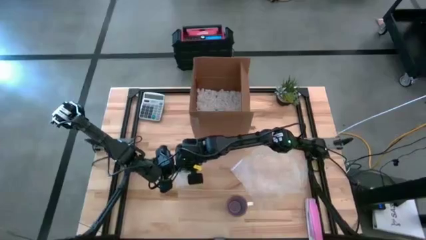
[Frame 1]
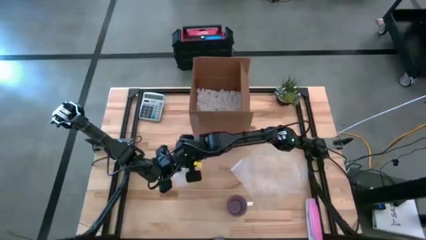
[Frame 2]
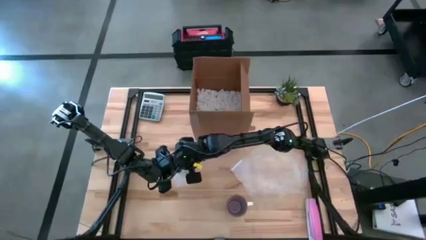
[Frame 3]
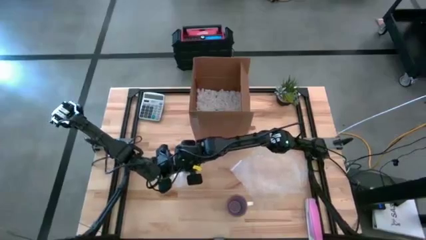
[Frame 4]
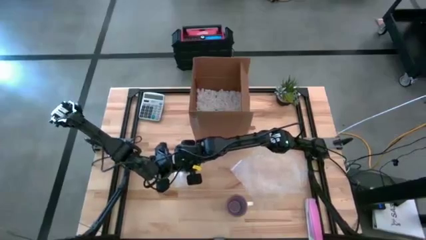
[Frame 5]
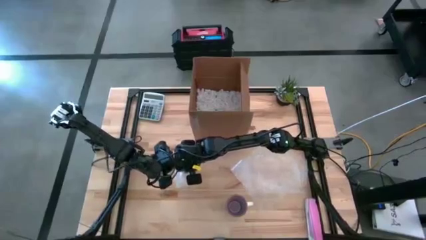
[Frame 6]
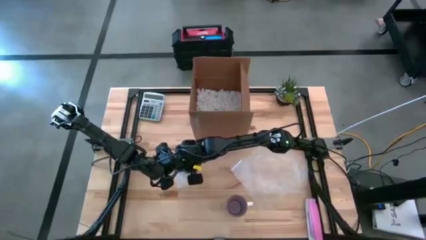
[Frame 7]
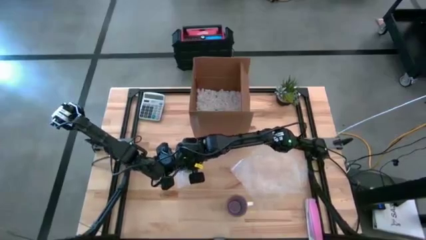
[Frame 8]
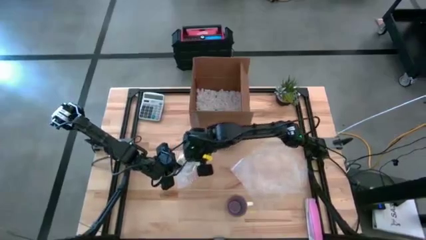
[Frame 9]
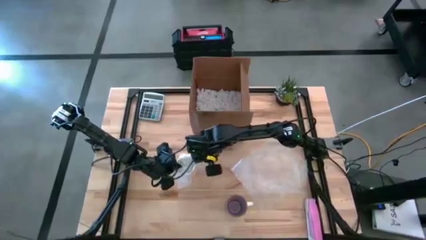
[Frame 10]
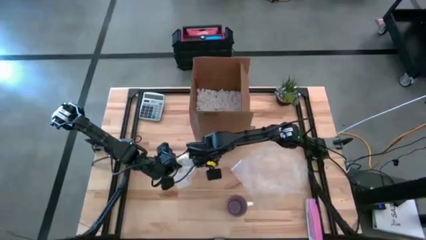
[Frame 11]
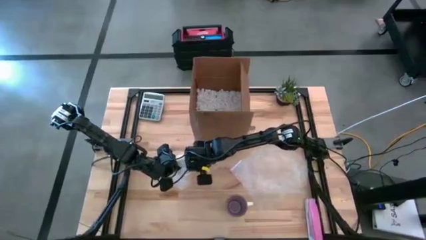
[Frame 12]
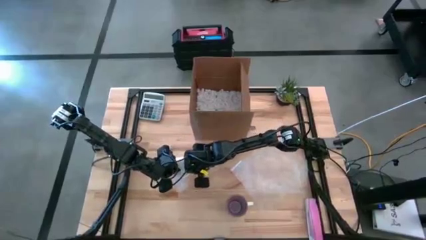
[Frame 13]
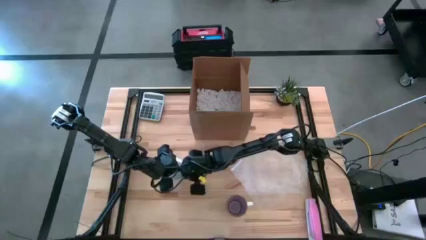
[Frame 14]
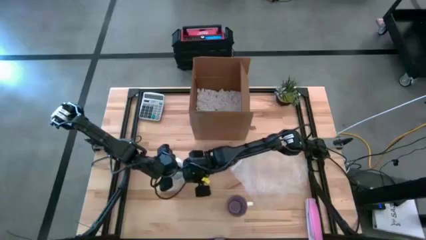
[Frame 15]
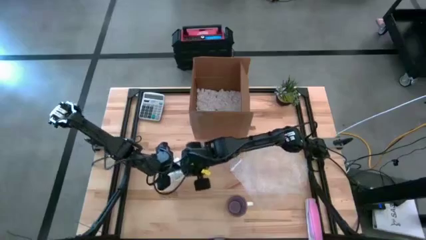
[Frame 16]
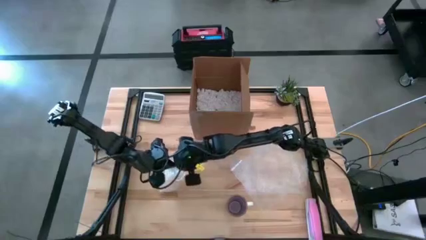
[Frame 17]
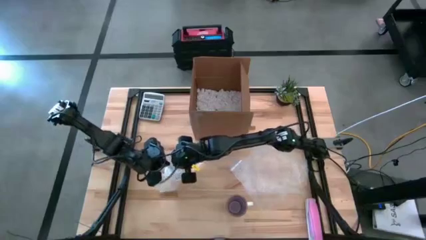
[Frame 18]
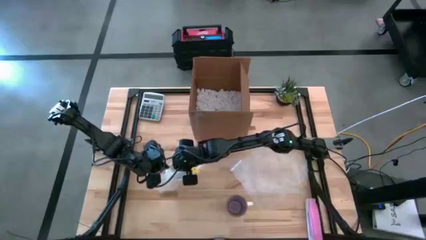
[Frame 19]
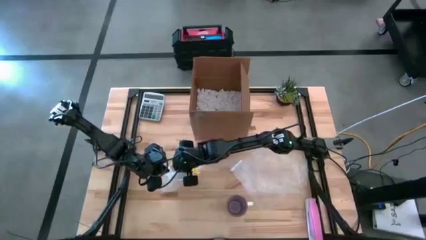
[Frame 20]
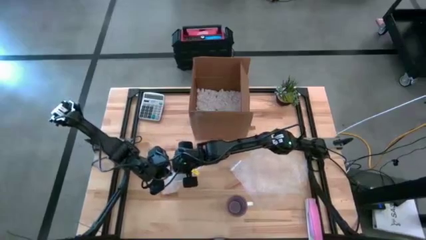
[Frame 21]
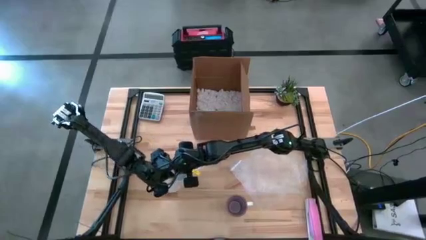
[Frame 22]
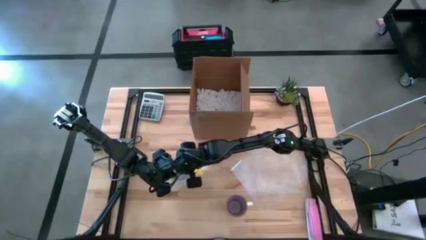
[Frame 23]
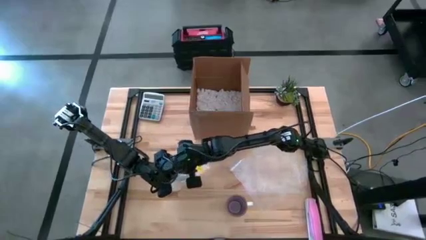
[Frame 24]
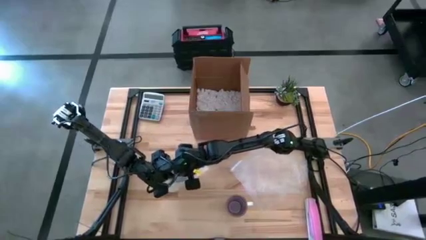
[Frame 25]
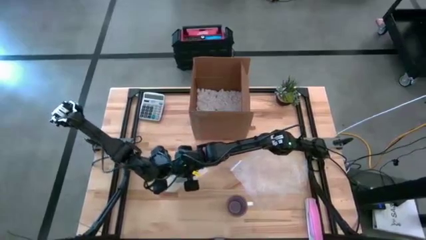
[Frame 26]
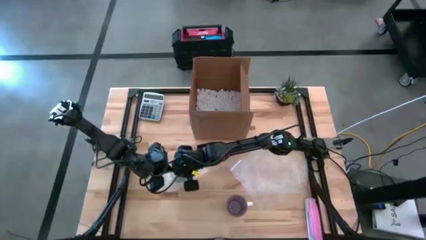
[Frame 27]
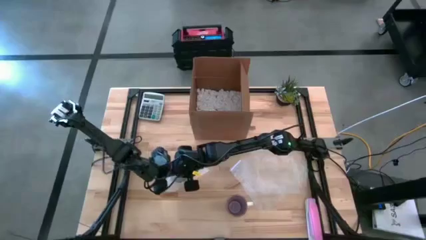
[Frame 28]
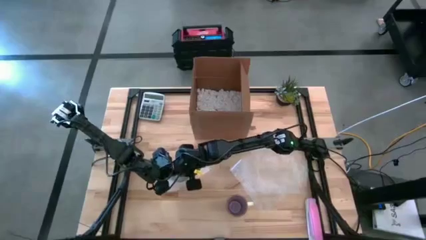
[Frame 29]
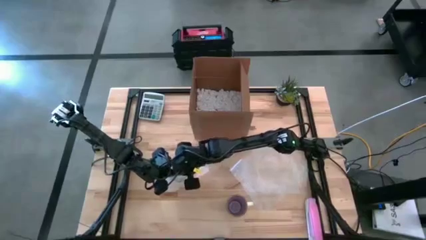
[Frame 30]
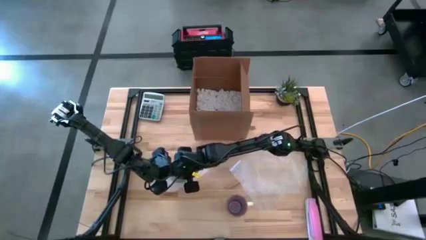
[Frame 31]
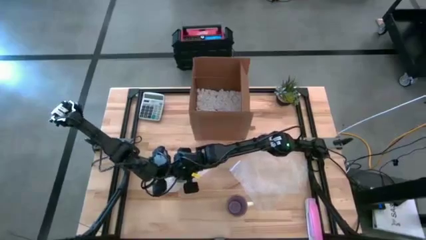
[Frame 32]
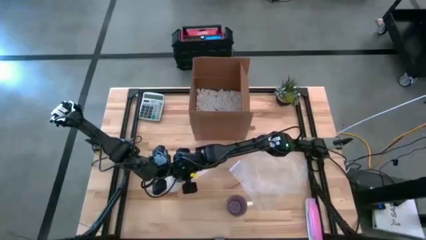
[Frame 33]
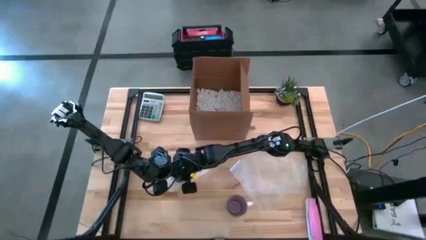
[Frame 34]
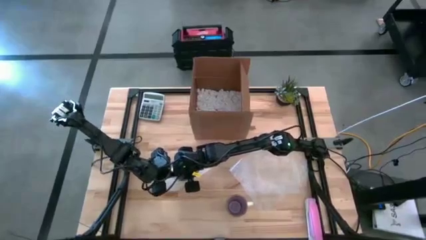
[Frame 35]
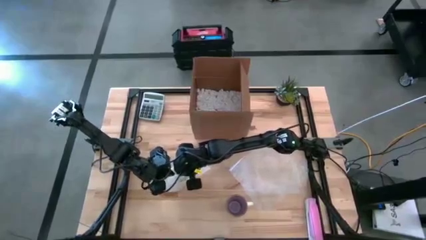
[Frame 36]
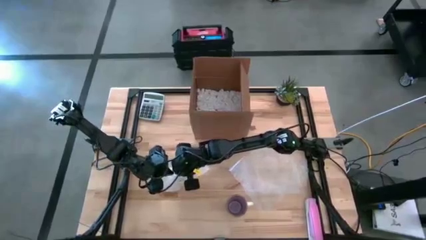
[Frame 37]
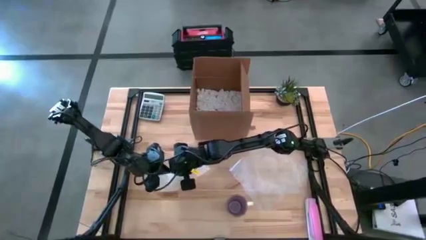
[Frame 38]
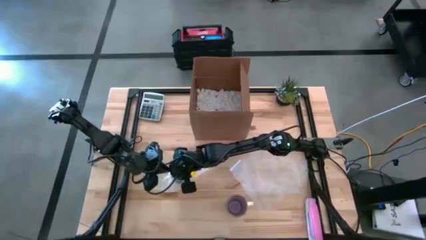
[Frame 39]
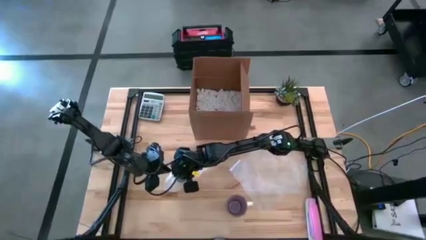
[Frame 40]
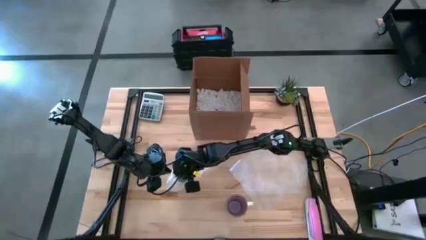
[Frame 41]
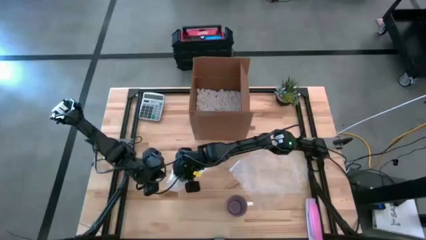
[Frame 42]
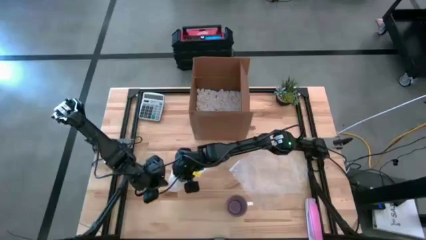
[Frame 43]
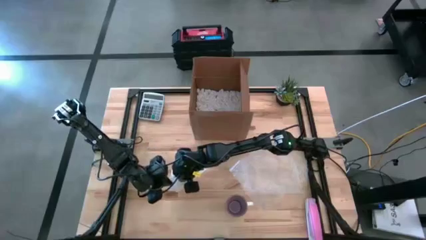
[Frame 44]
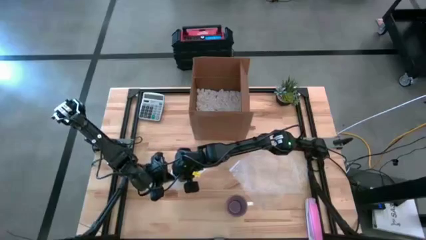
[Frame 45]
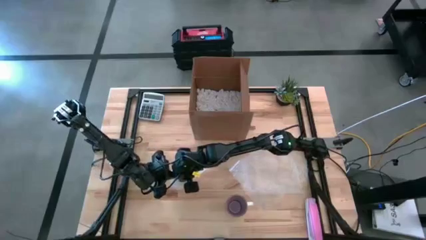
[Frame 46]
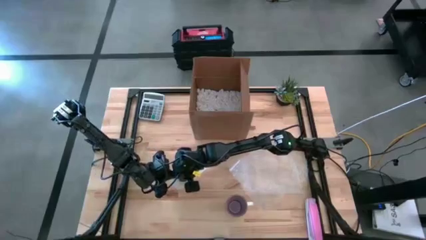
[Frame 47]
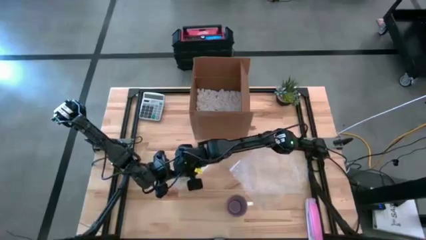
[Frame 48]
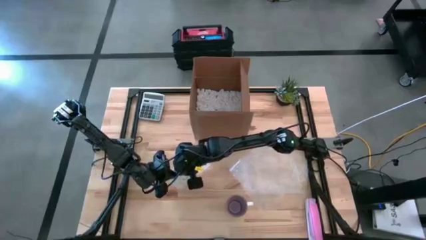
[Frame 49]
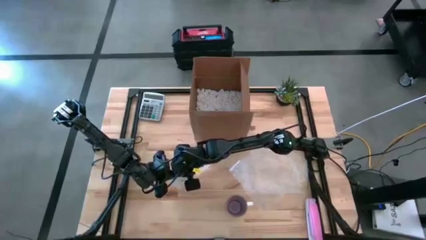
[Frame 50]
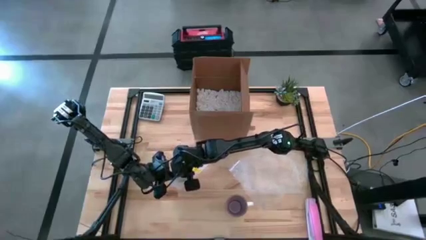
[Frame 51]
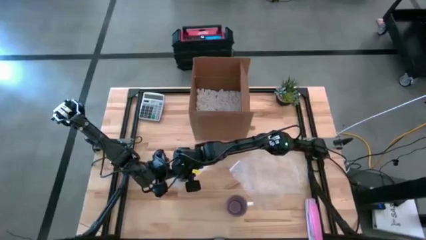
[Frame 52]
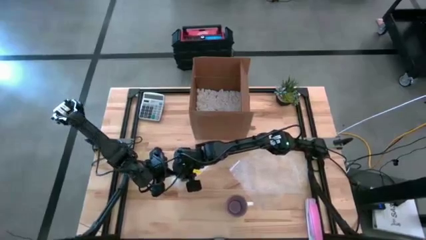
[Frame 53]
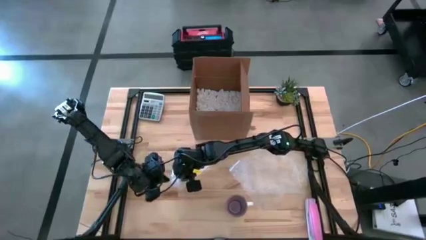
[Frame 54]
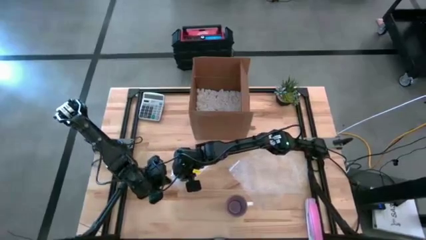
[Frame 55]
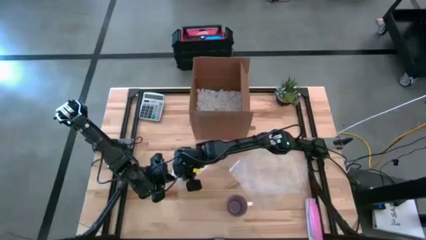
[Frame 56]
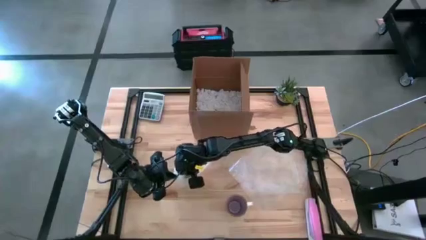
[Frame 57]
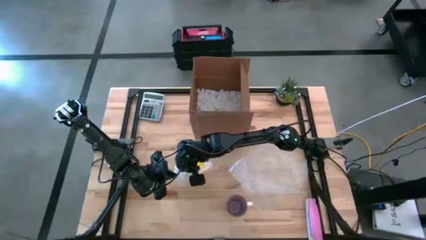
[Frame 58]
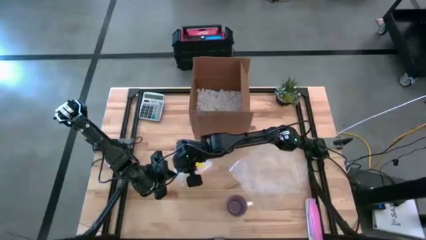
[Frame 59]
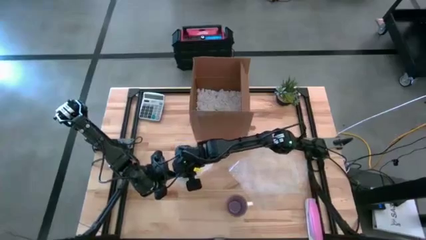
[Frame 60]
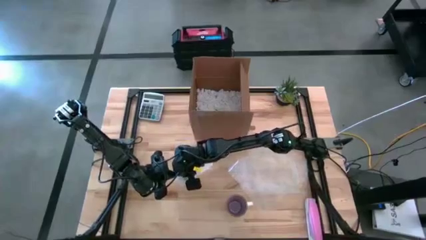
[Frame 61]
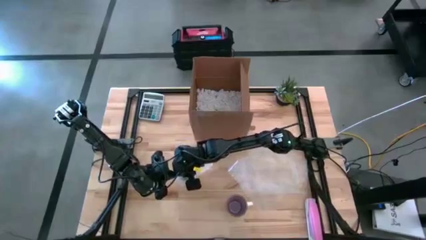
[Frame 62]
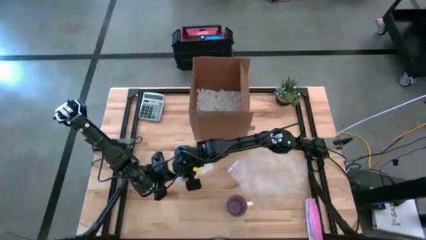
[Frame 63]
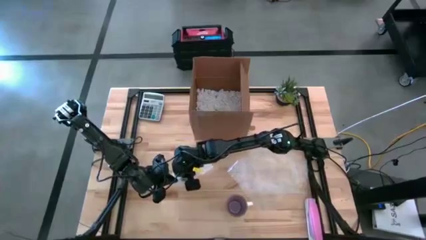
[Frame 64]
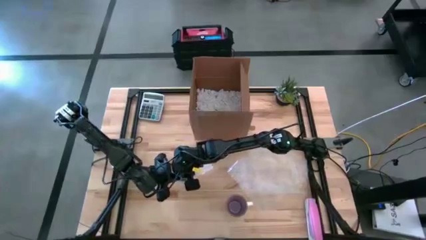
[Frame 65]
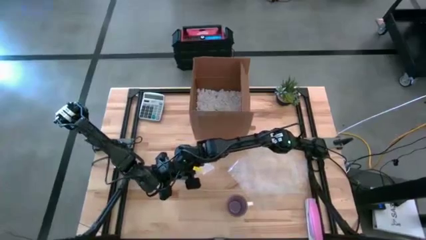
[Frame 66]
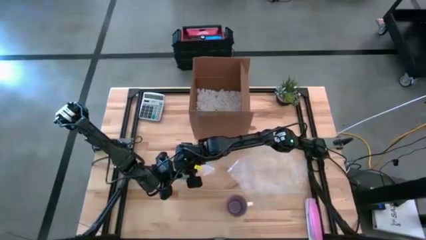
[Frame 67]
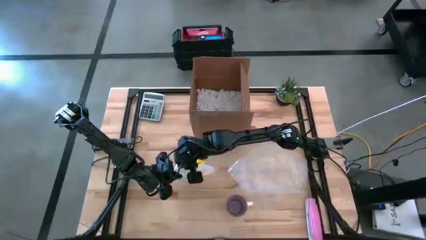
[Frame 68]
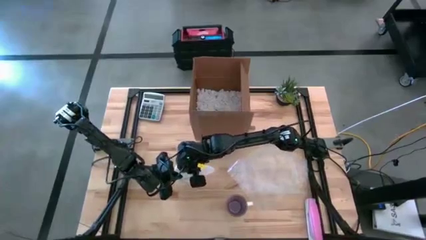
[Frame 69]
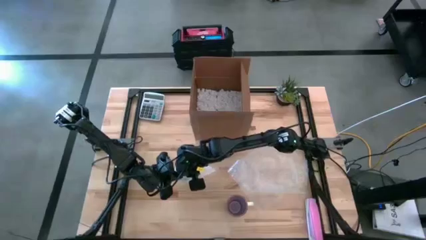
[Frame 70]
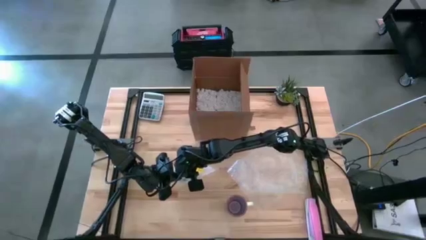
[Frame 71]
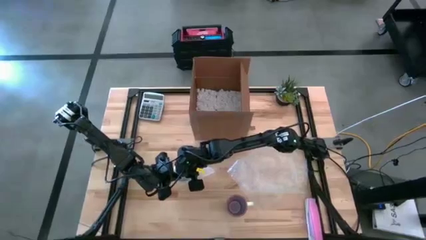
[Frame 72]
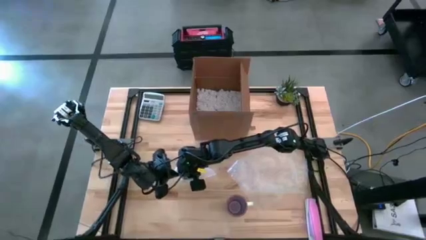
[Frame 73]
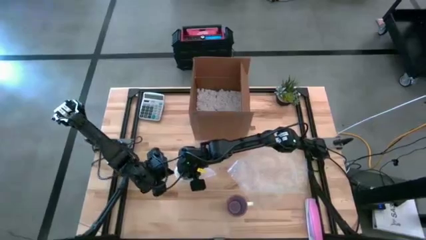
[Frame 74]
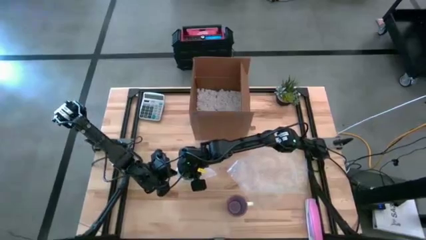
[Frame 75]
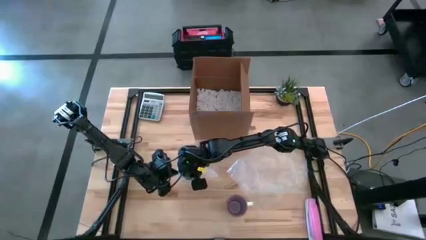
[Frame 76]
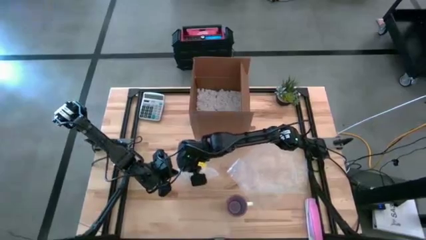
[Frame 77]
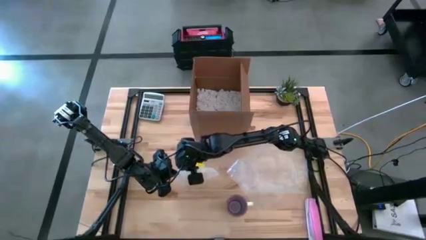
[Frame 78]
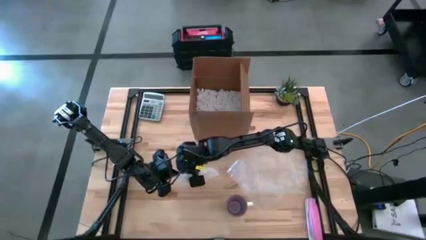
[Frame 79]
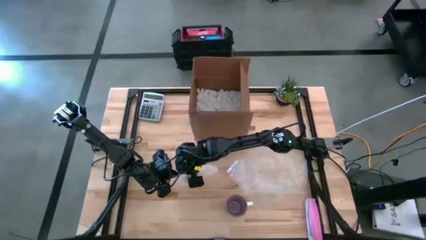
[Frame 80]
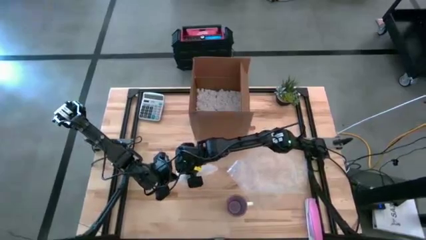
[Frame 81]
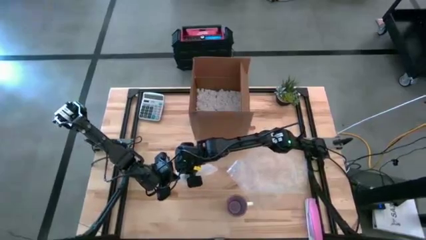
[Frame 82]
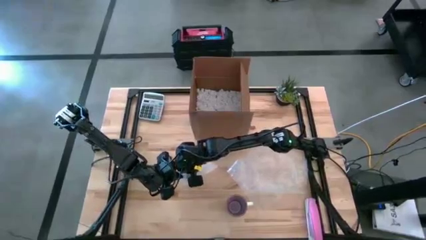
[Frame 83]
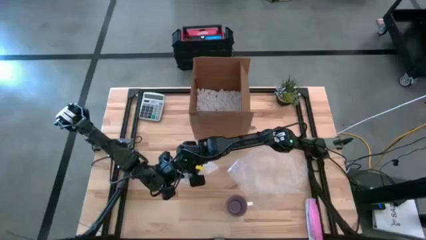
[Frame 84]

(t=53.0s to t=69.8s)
Task: wrap mug
Wrap the yellow mug with bubble wrap
